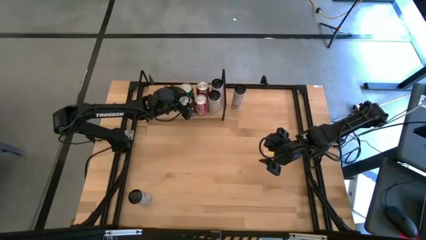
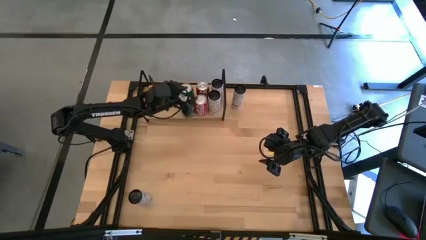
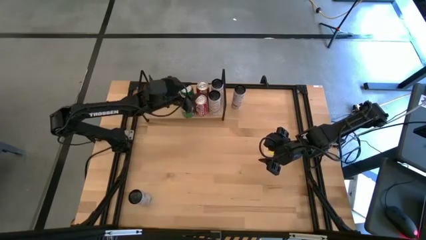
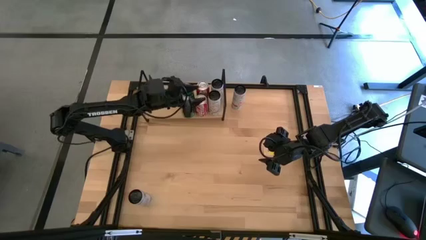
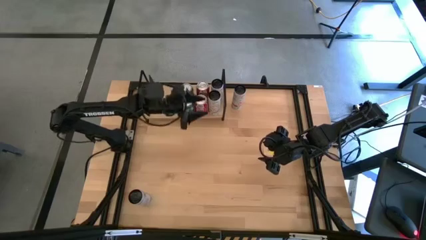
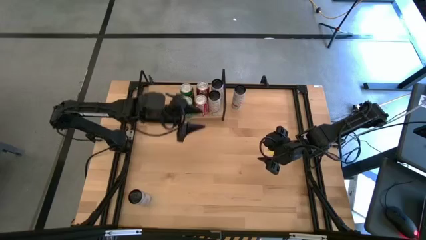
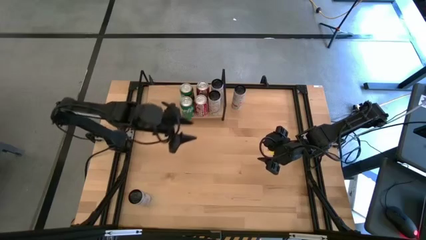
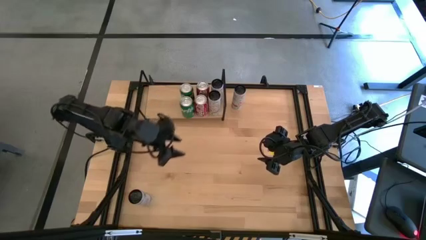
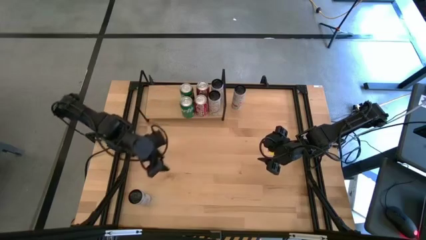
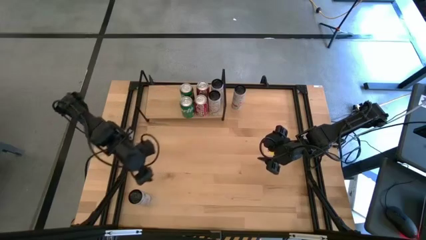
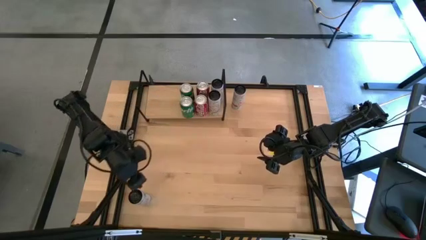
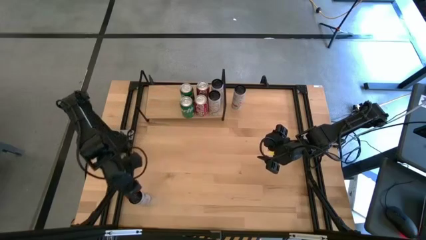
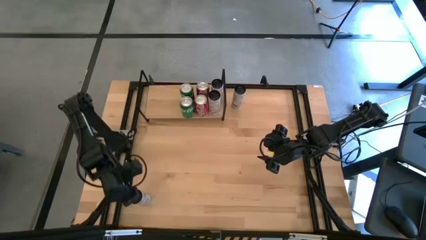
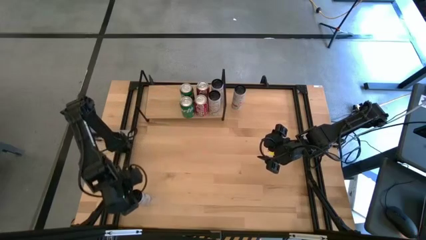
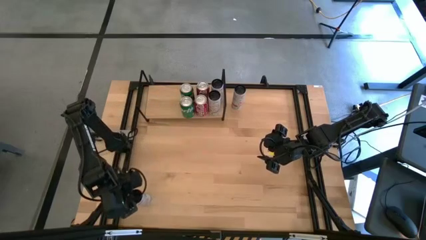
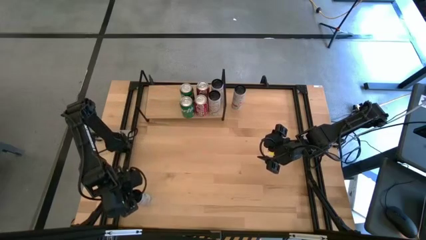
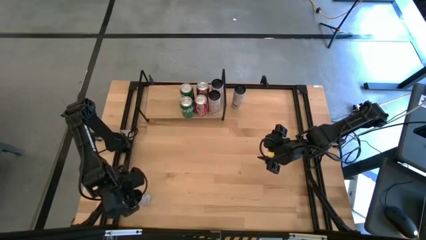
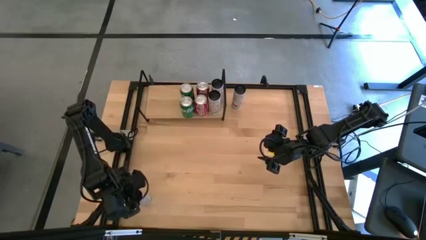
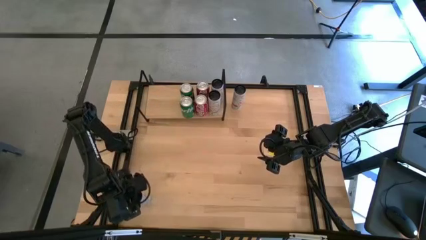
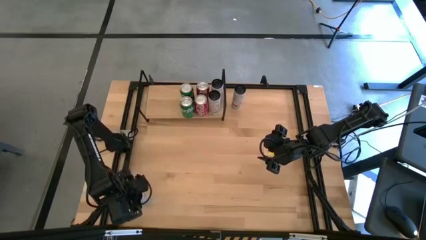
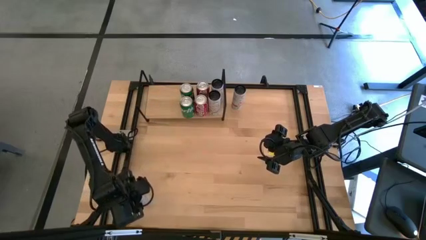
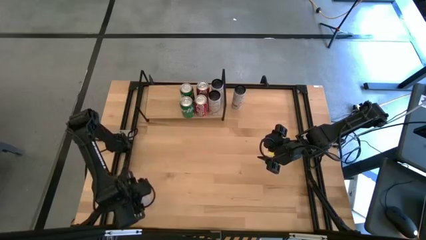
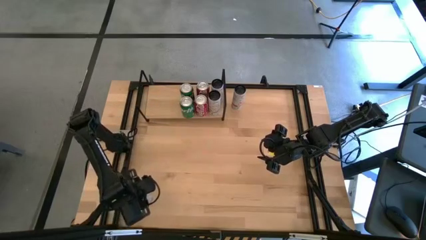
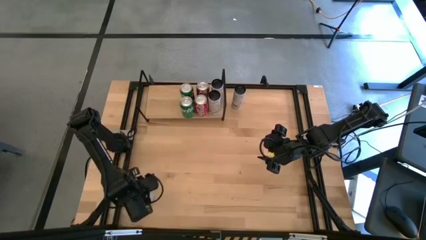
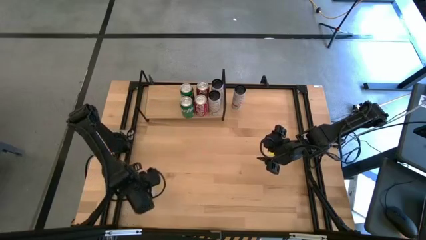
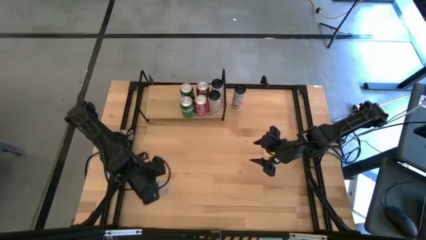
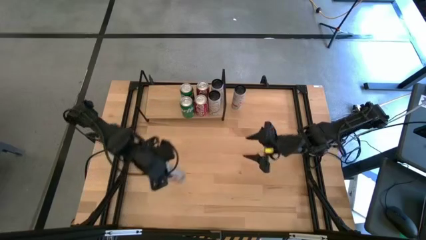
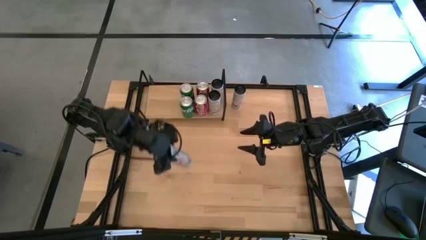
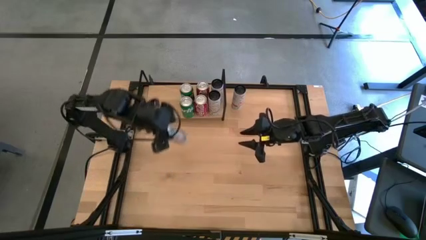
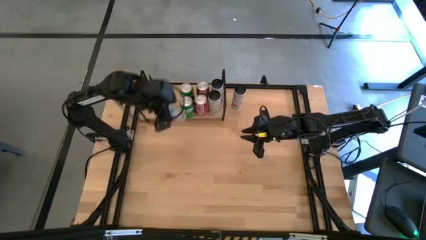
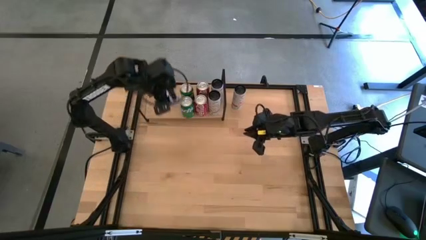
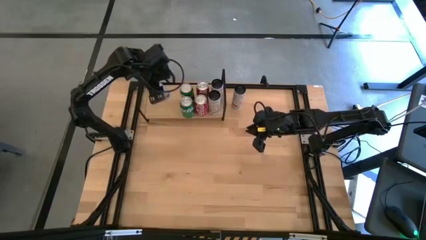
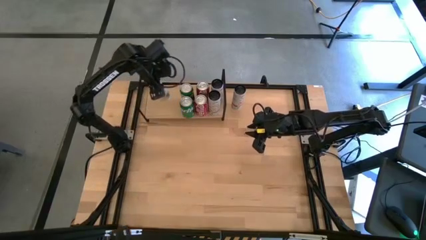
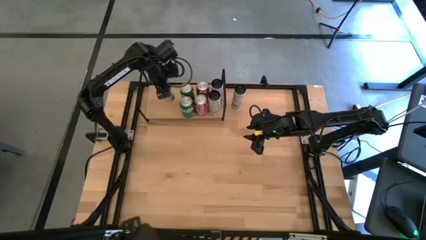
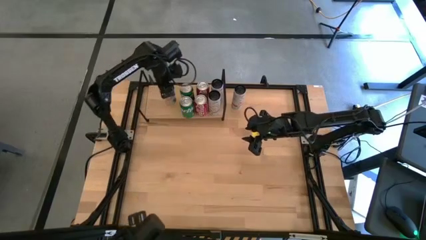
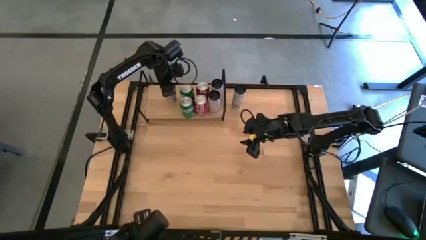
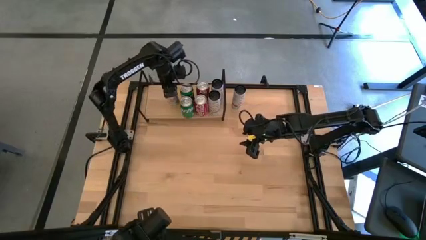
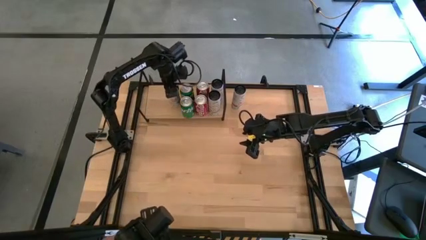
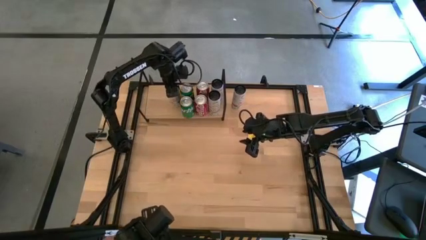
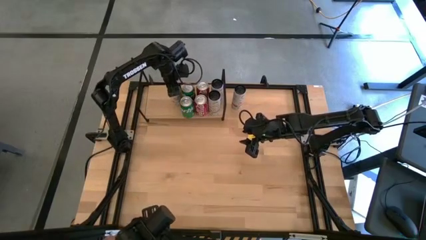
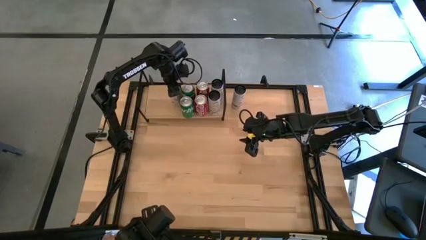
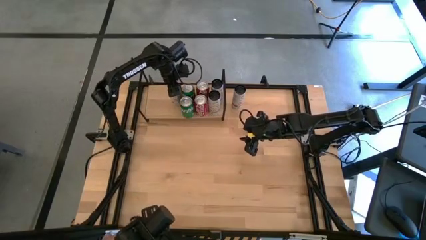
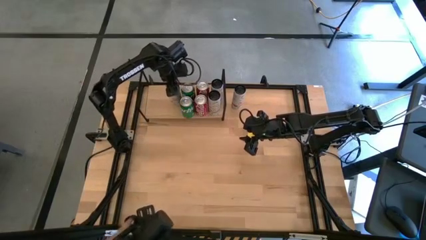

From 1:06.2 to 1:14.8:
Task: Place canned beverage on shelf
Put the bottom white pink soda can on the shelf

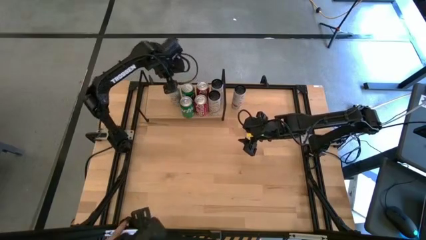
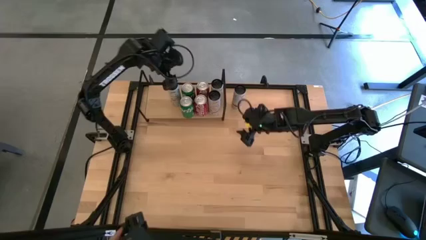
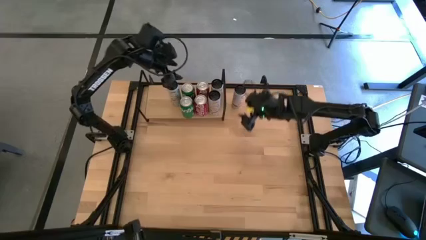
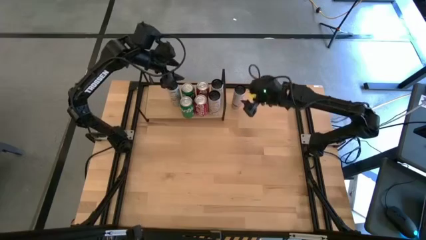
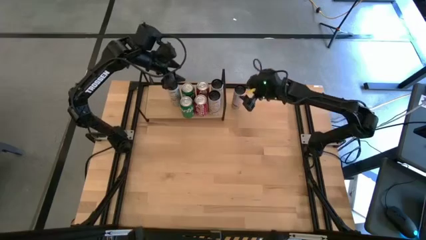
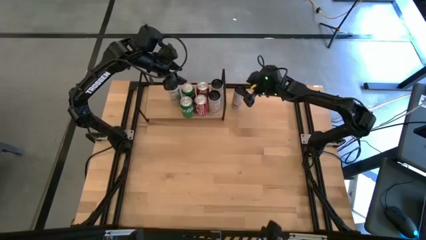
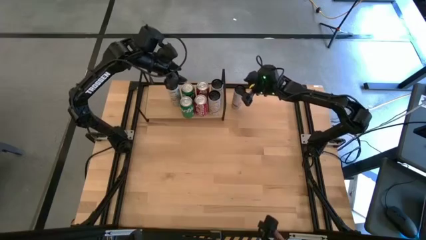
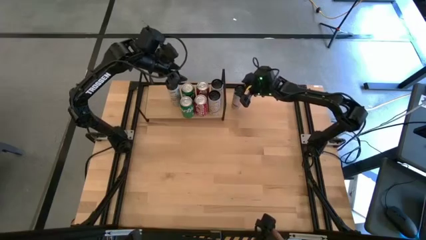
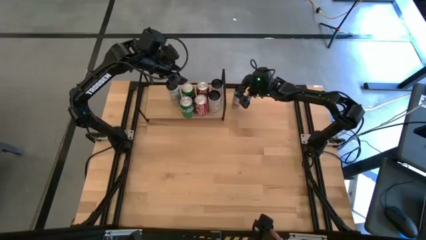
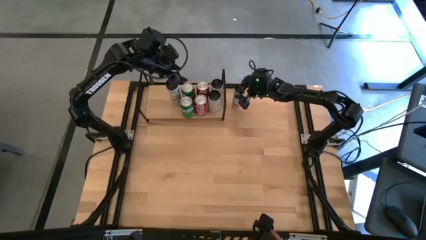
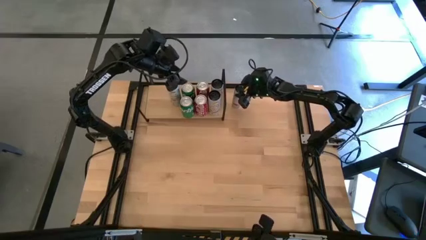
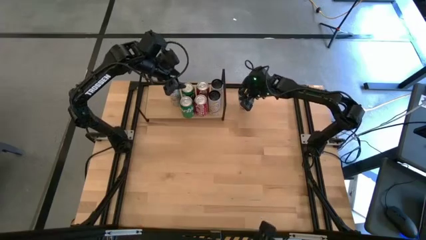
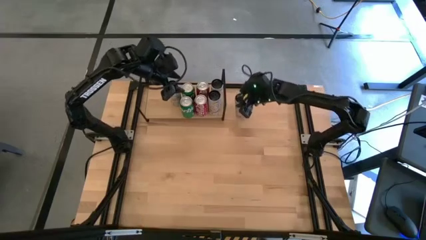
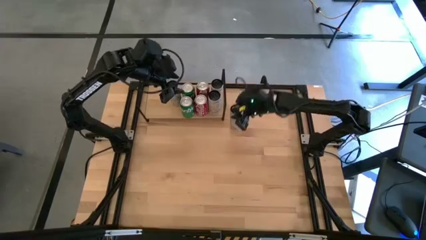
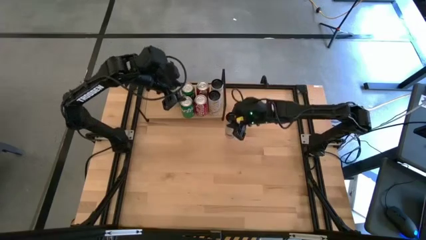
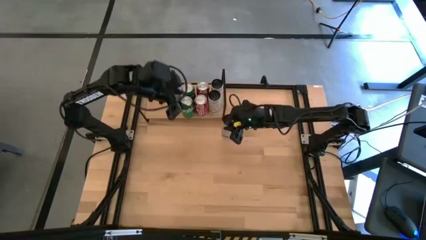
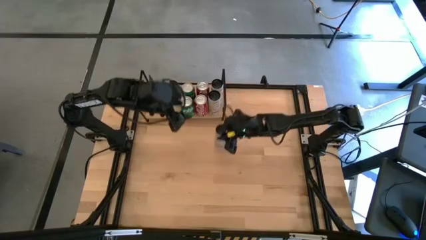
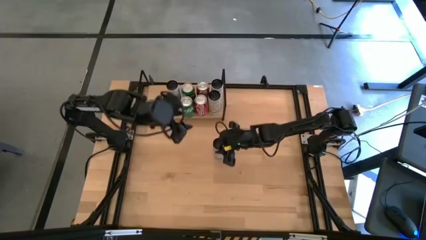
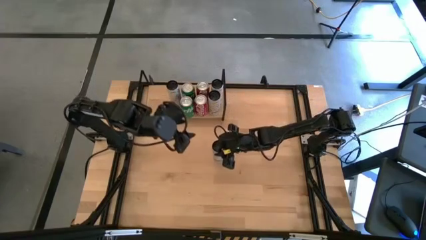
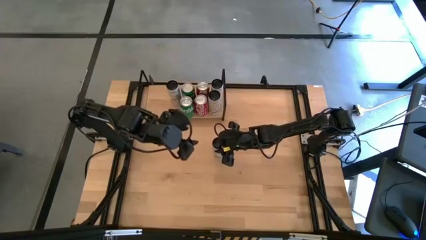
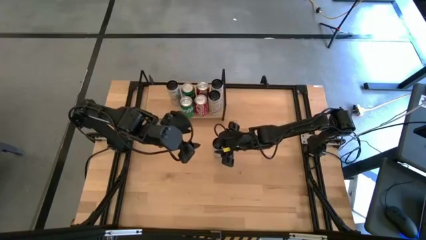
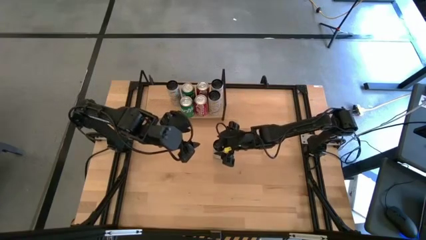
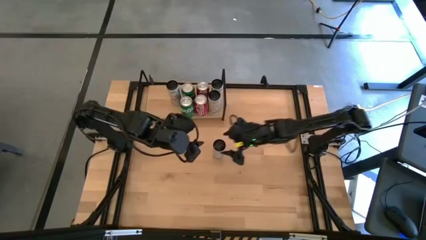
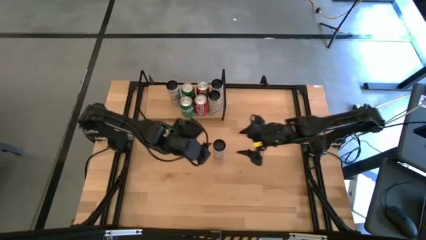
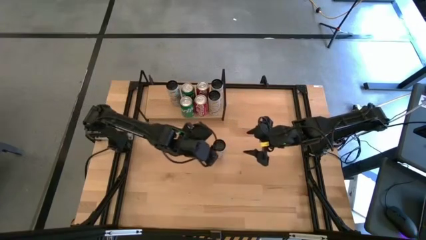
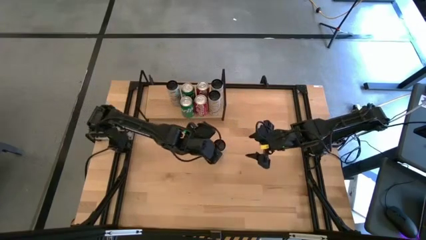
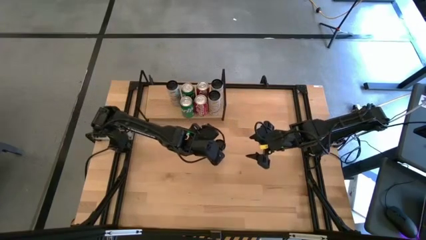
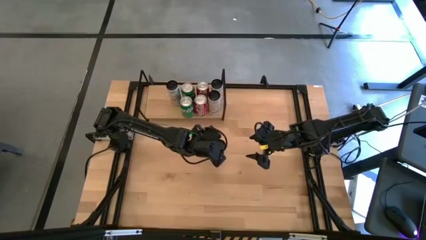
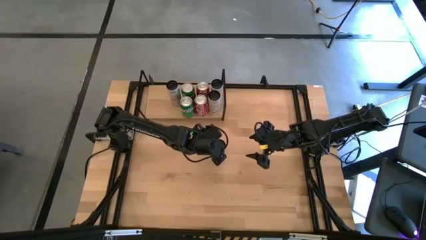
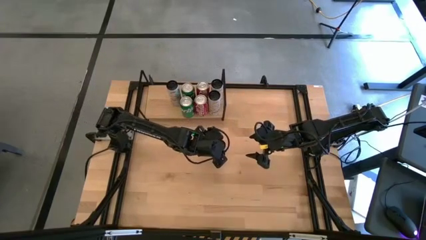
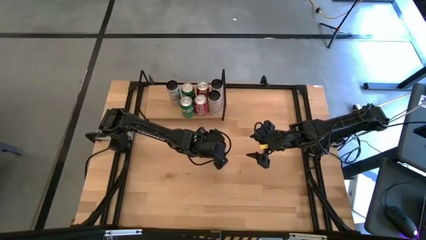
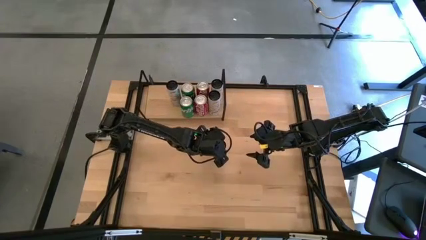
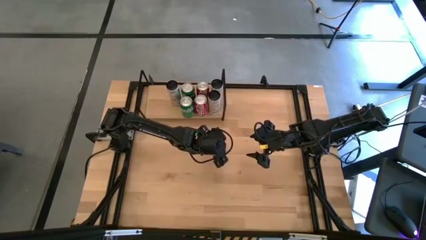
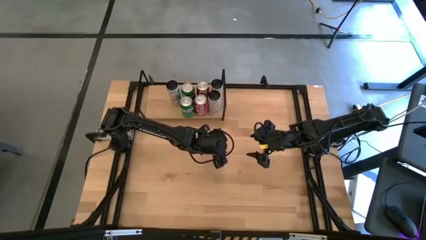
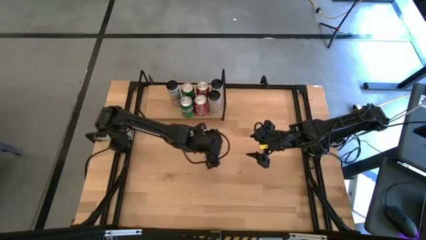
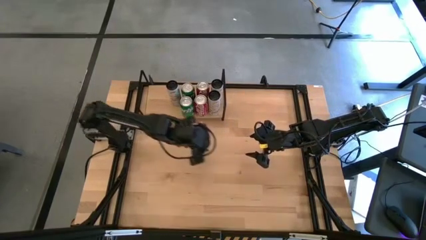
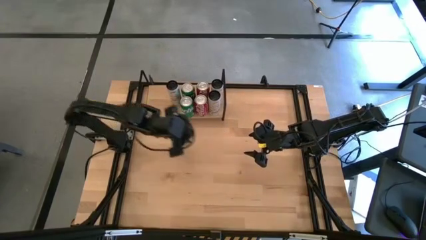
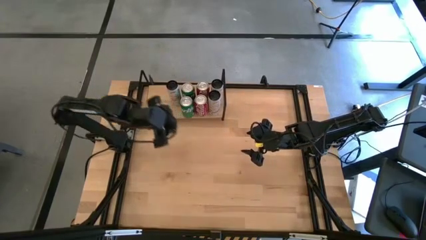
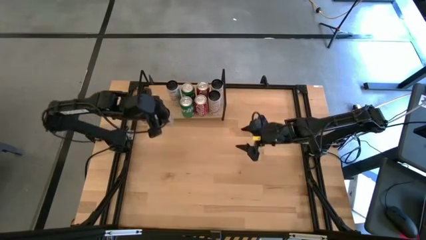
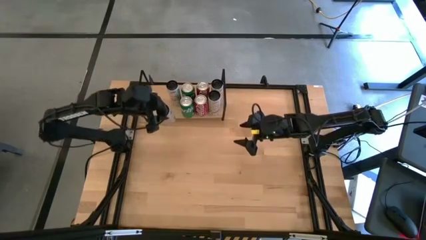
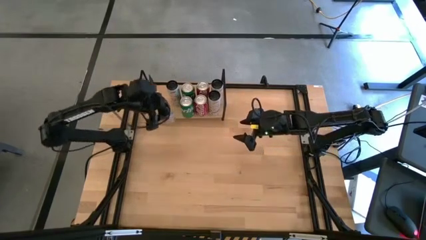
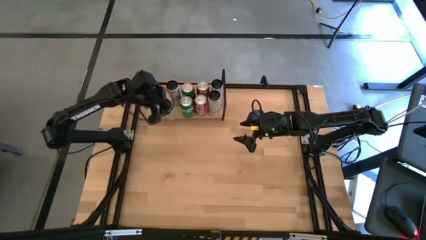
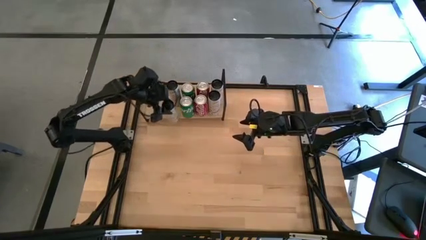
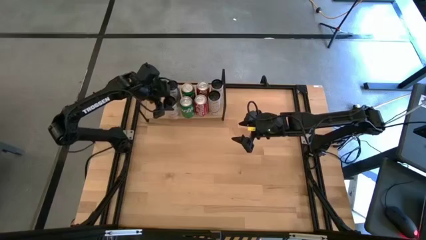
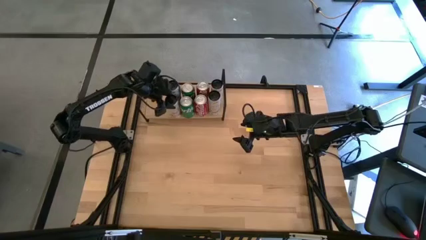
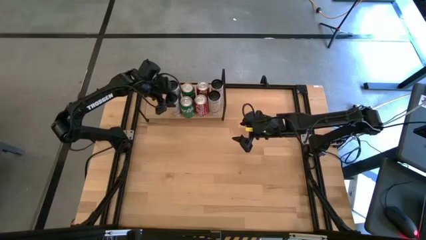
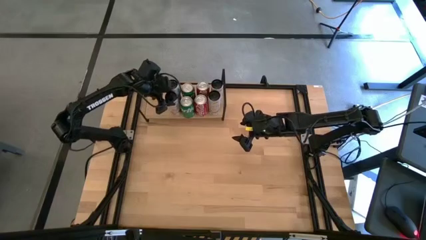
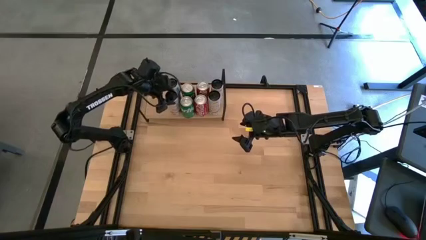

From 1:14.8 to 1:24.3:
Put the white pink soda can on the shelf aligned with the other white pink soda can
